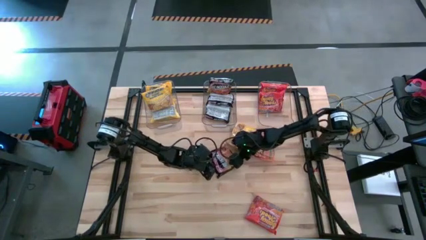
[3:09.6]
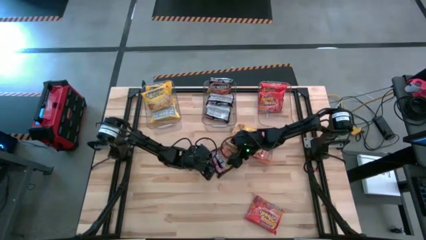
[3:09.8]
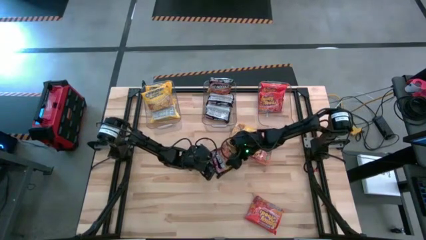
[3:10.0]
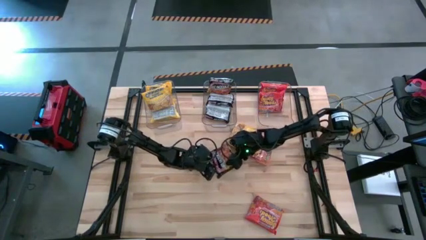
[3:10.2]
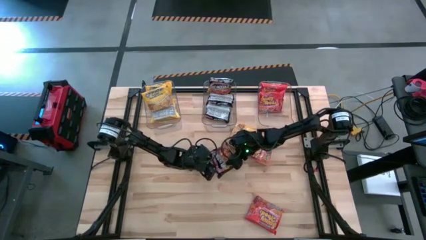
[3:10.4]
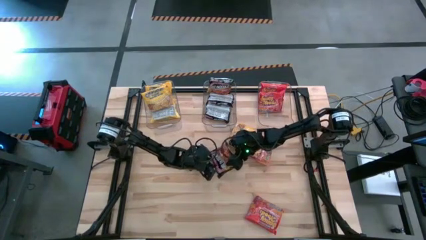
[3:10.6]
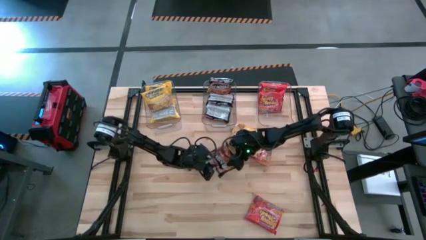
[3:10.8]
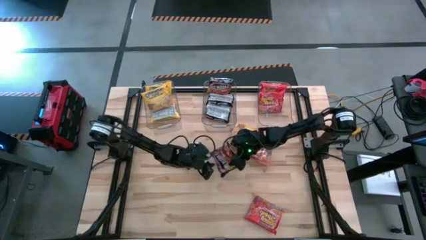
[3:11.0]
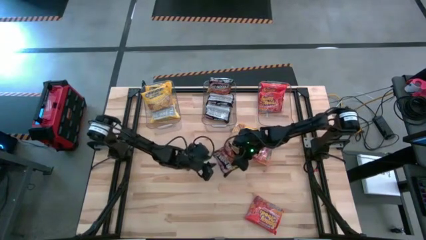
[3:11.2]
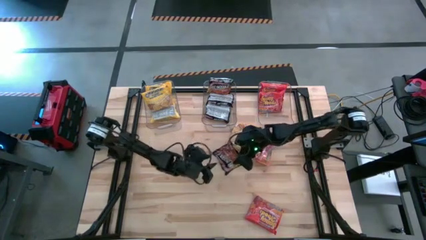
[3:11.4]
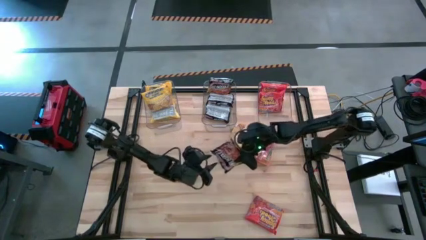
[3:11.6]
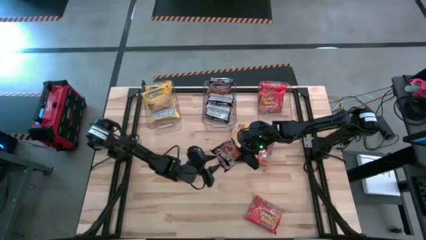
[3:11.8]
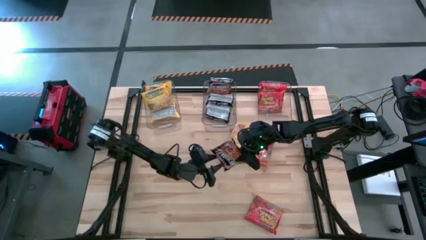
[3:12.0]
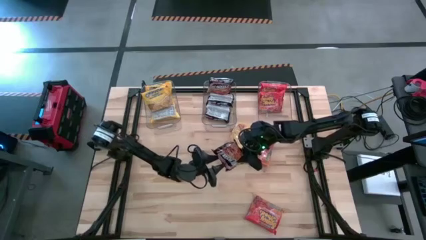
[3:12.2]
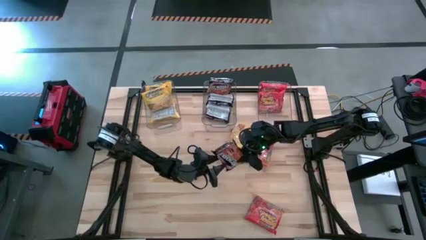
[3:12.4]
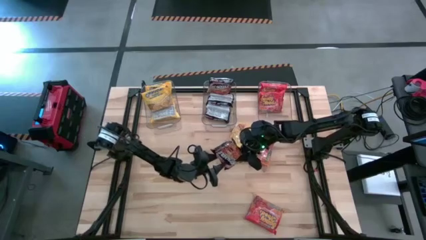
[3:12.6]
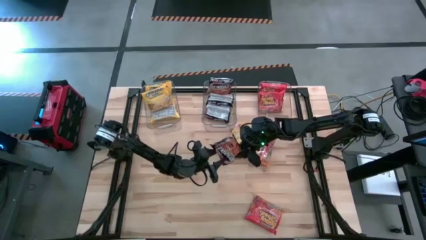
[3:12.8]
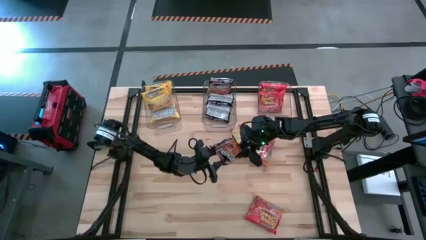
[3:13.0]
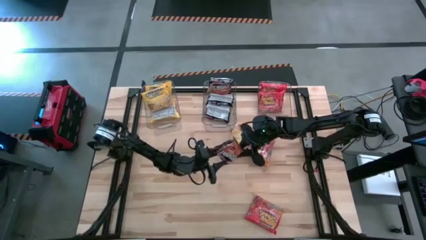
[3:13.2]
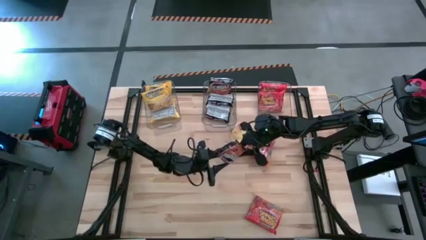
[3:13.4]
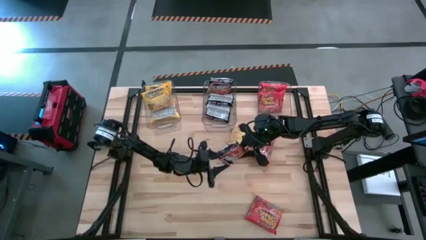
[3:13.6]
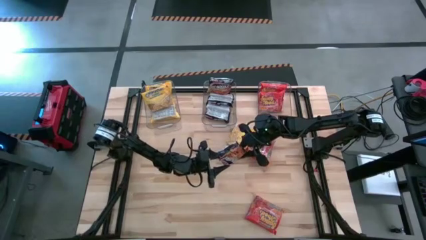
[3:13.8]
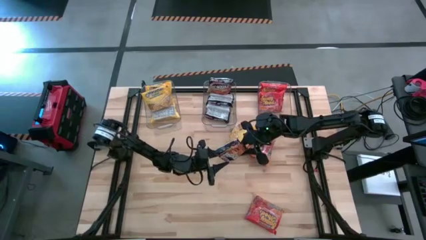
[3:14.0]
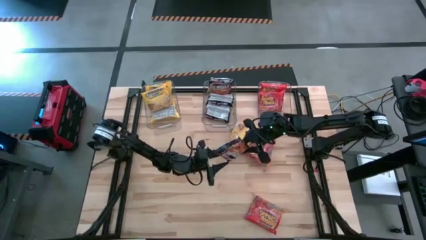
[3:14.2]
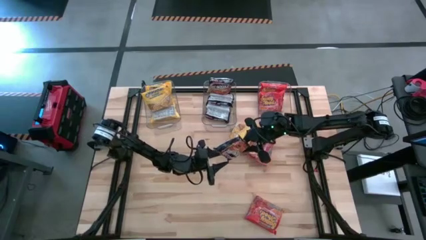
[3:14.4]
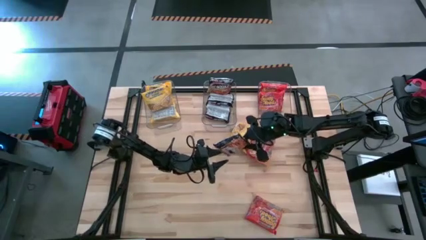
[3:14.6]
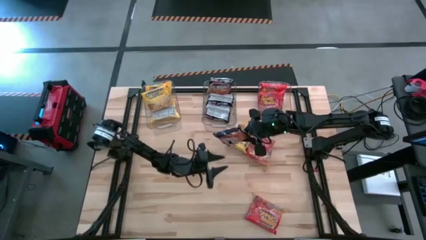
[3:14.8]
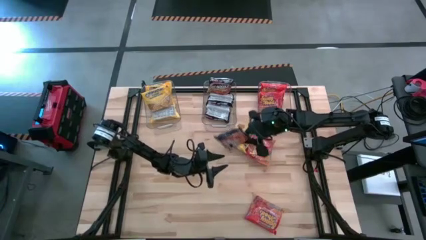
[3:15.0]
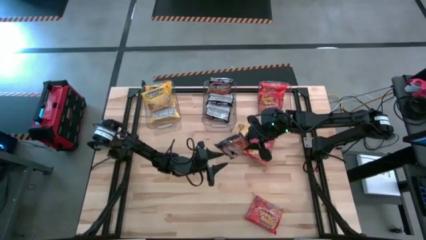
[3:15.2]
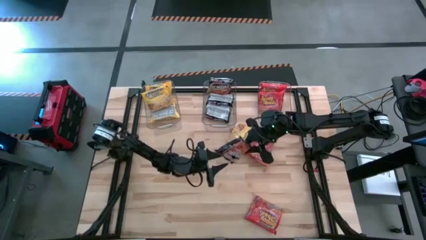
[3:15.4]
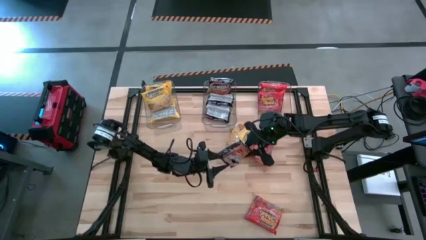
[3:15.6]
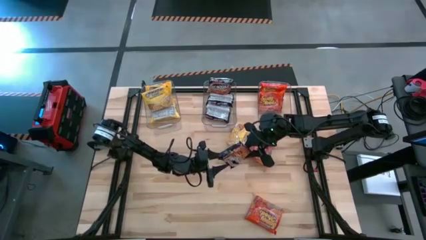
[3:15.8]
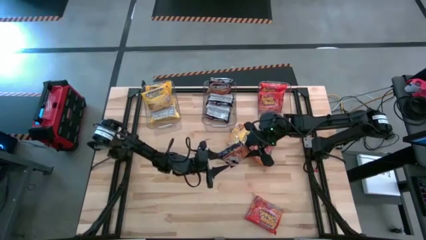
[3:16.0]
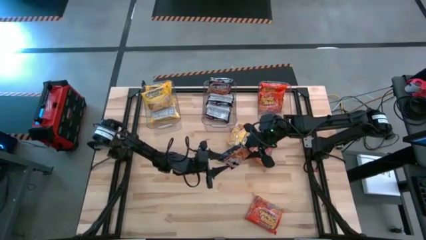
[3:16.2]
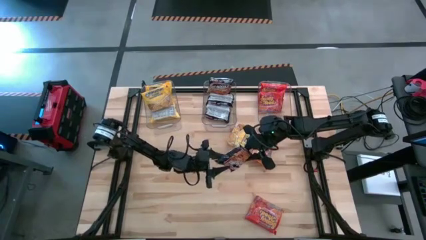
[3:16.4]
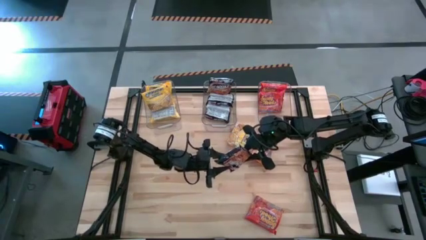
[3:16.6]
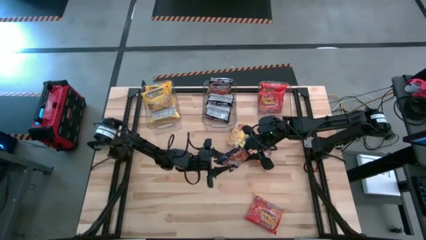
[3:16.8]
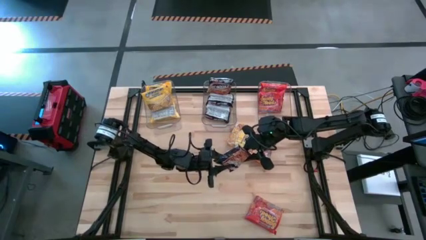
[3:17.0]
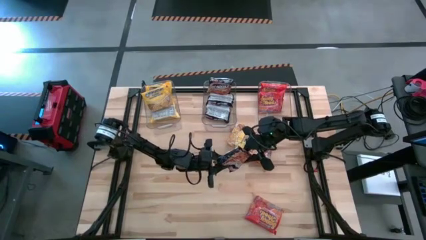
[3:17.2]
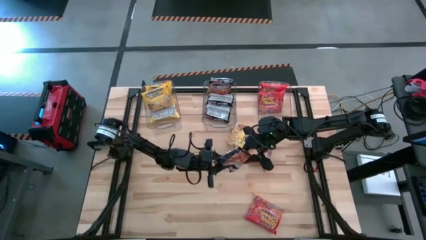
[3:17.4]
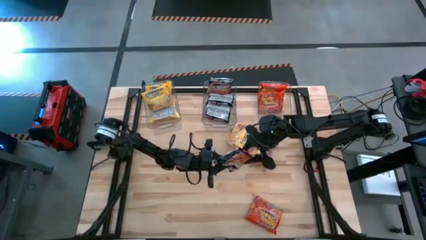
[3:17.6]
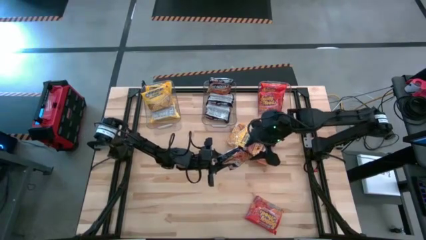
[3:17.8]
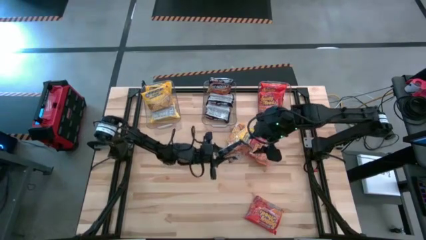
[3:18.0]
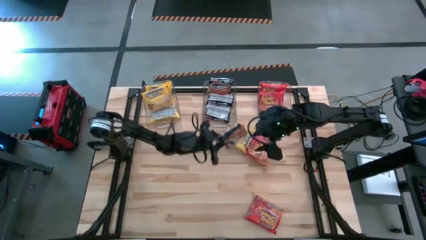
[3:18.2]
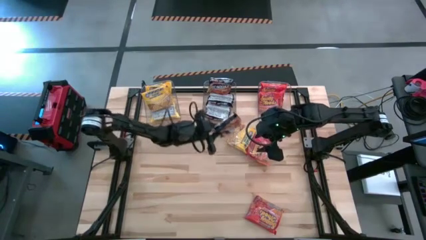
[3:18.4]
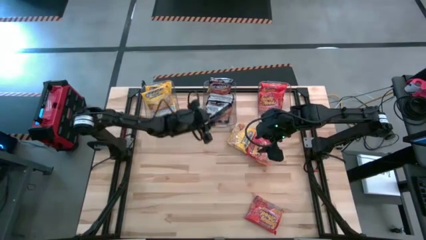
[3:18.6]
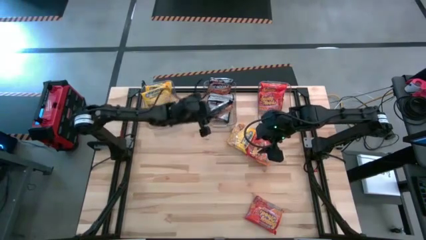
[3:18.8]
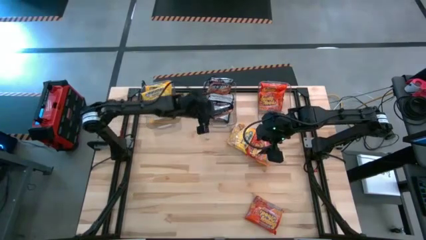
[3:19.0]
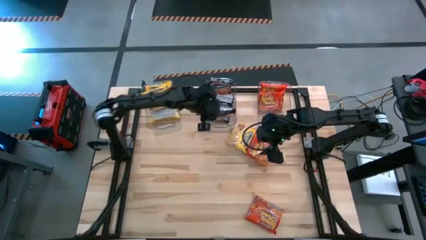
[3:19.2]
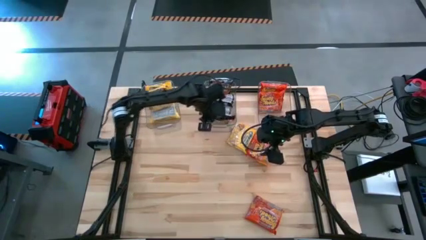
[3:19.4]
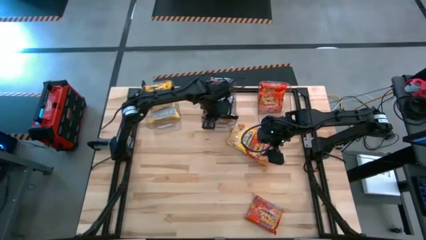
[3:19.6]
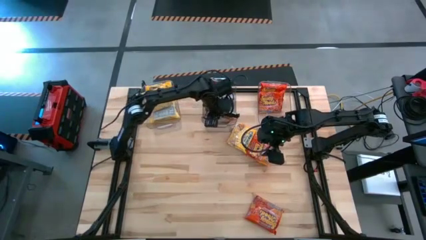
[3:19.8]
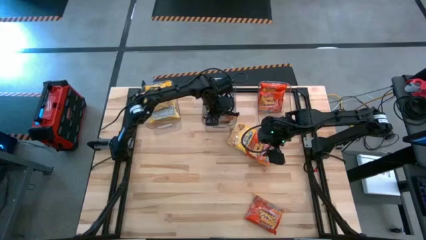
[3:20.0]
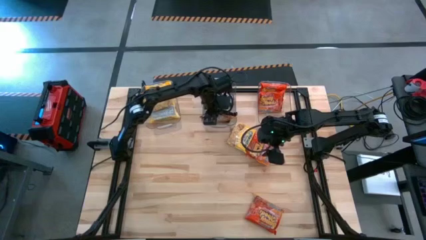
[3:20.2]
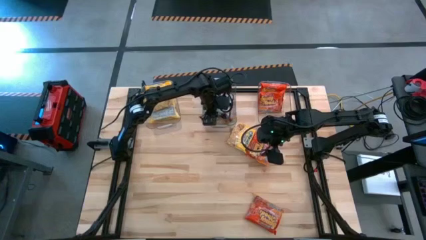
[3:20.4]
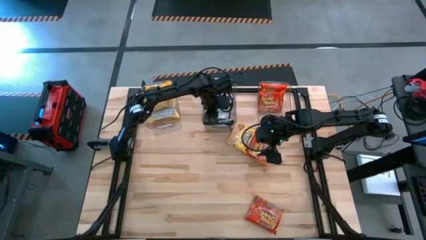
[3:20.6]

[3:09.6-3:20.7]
Task: Sort Maruchan noodles
Put the black noodle pack into the middle transparent bin
